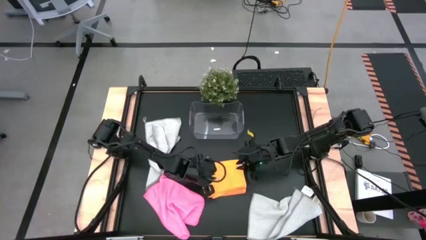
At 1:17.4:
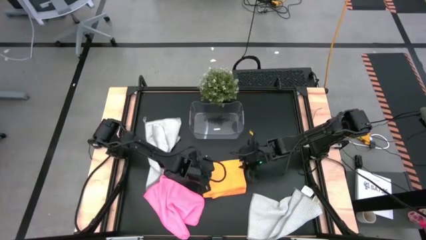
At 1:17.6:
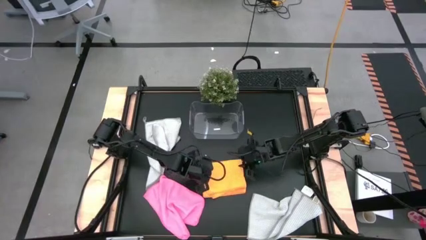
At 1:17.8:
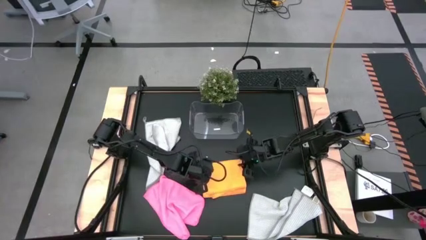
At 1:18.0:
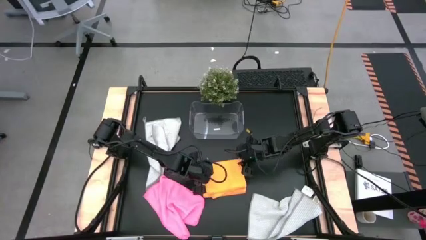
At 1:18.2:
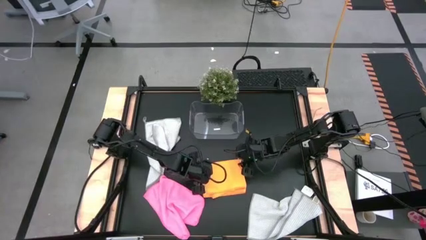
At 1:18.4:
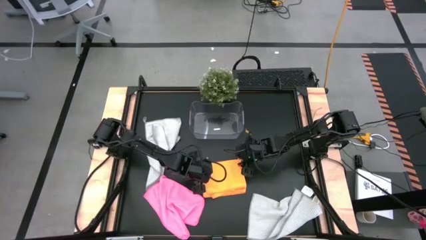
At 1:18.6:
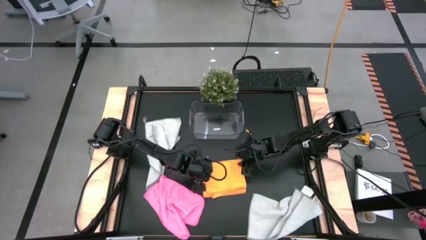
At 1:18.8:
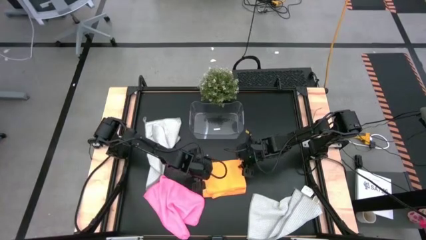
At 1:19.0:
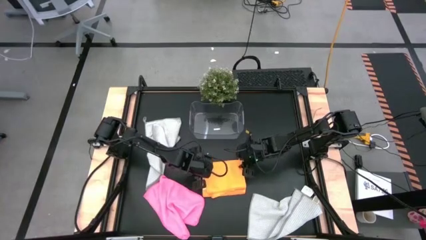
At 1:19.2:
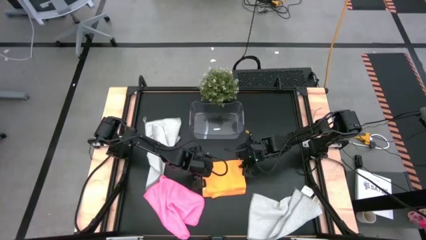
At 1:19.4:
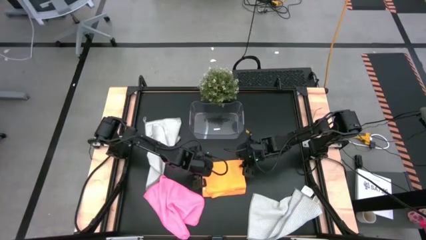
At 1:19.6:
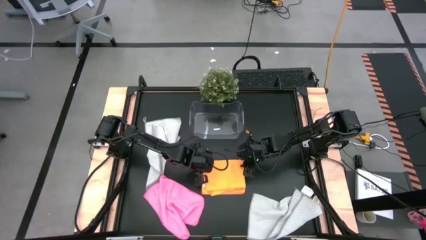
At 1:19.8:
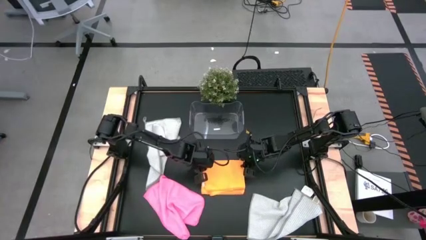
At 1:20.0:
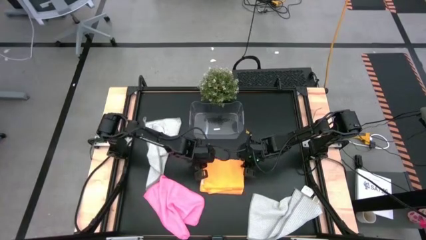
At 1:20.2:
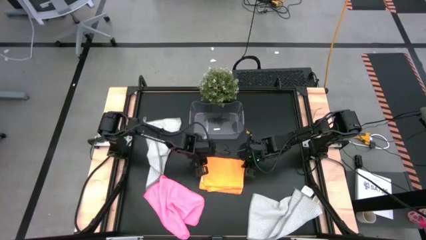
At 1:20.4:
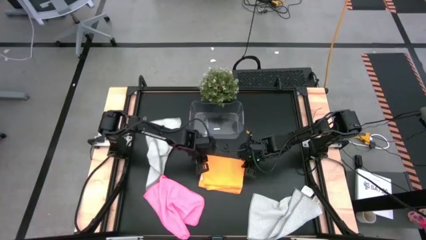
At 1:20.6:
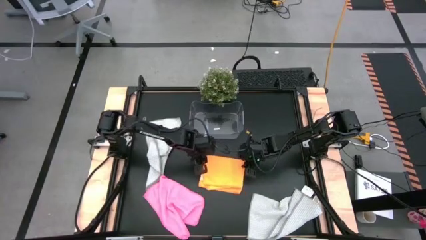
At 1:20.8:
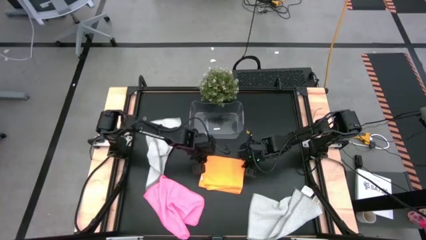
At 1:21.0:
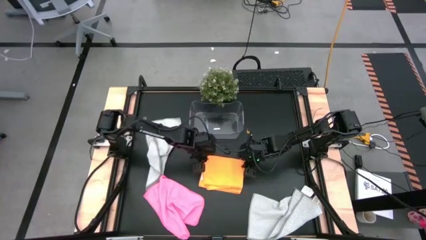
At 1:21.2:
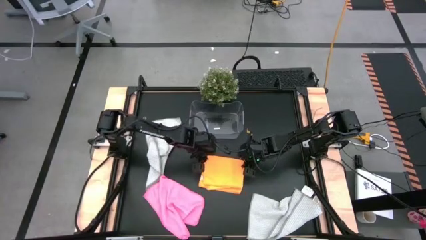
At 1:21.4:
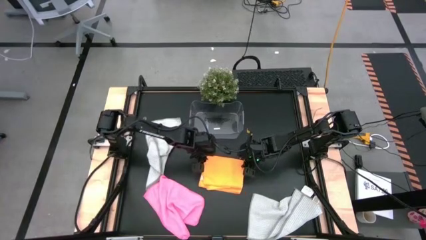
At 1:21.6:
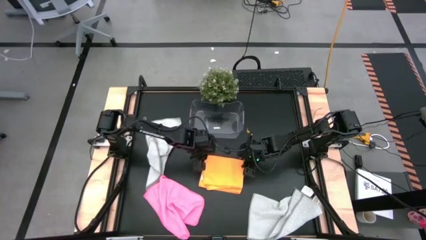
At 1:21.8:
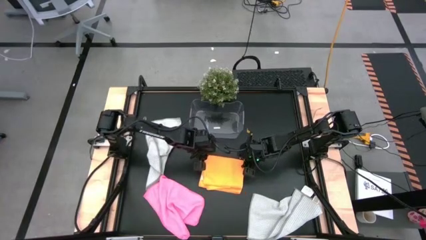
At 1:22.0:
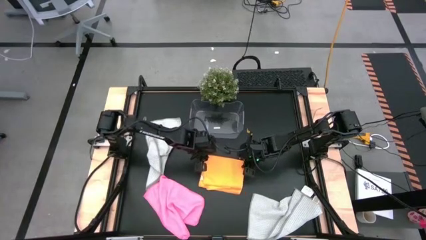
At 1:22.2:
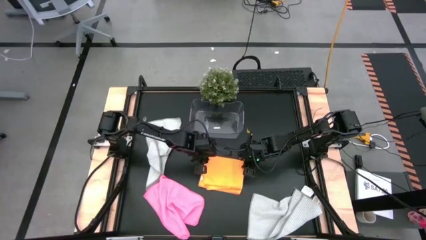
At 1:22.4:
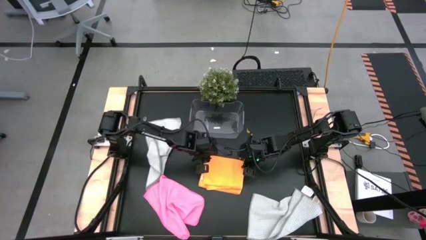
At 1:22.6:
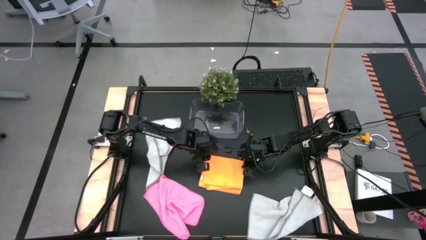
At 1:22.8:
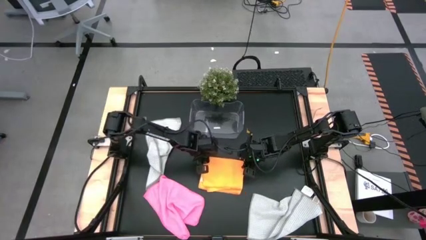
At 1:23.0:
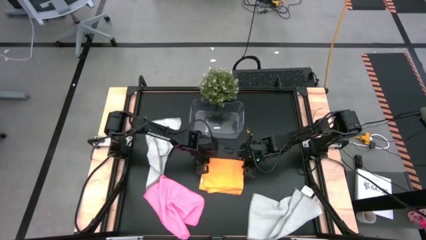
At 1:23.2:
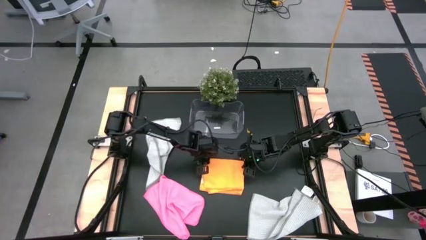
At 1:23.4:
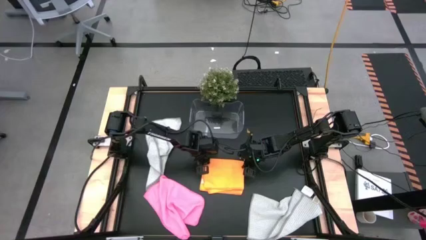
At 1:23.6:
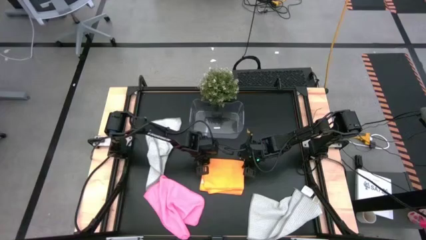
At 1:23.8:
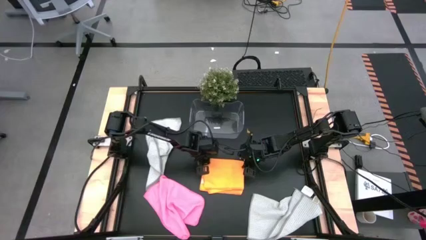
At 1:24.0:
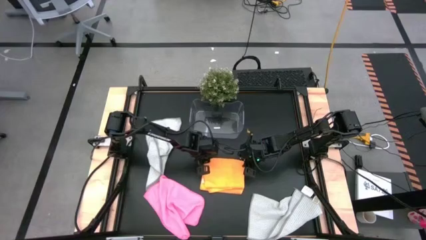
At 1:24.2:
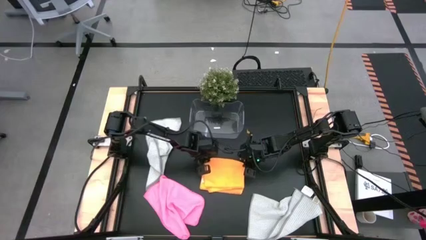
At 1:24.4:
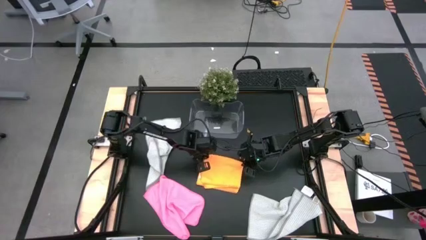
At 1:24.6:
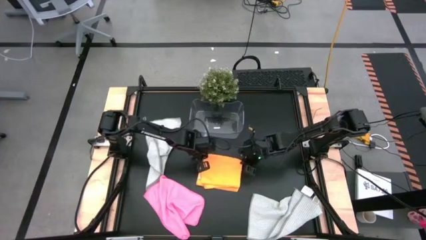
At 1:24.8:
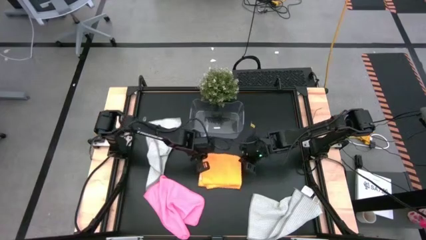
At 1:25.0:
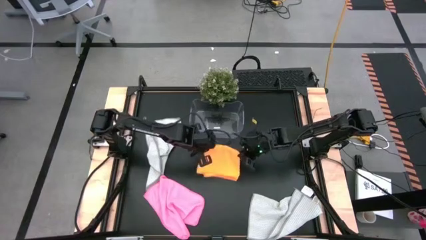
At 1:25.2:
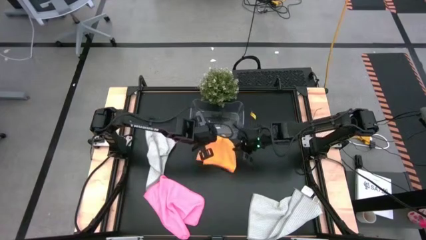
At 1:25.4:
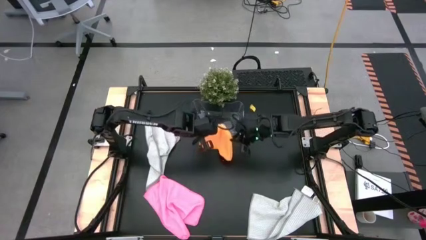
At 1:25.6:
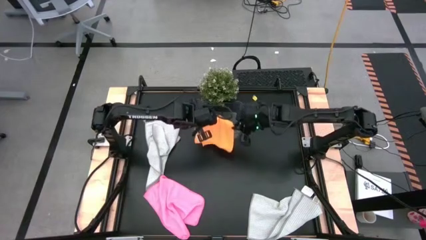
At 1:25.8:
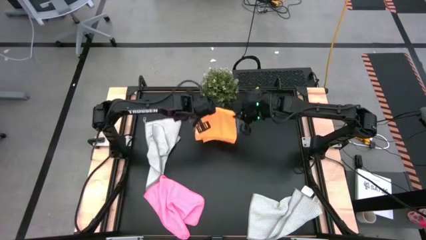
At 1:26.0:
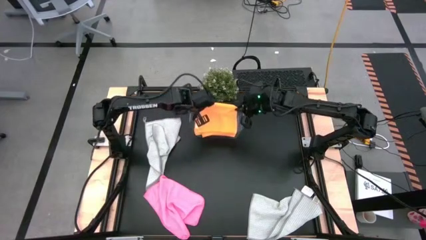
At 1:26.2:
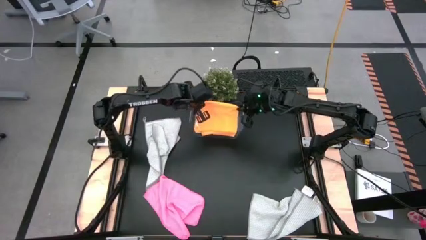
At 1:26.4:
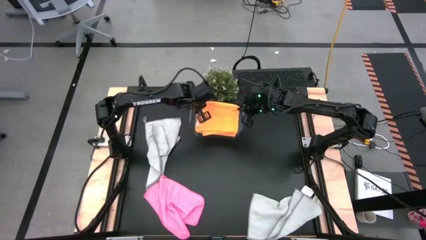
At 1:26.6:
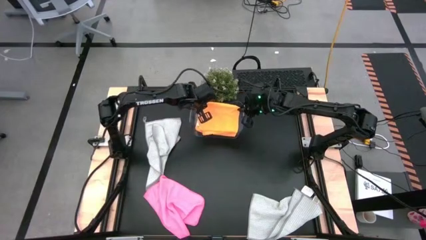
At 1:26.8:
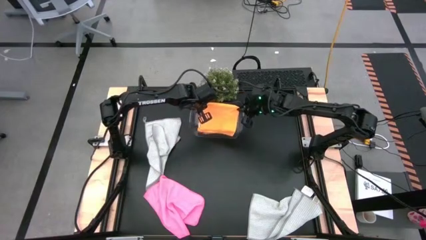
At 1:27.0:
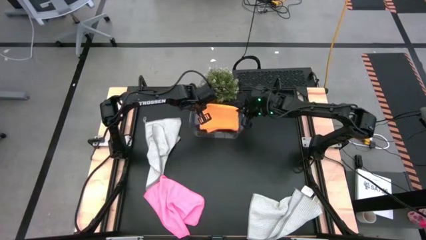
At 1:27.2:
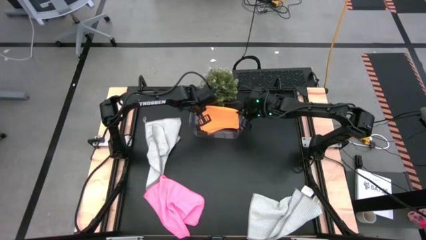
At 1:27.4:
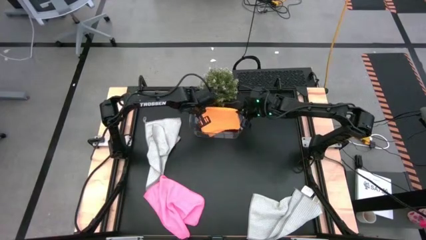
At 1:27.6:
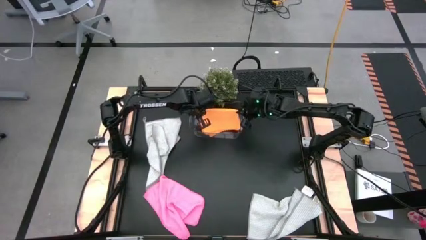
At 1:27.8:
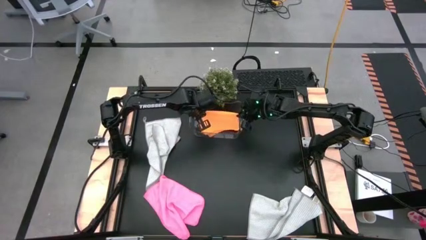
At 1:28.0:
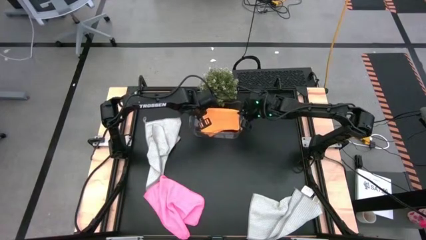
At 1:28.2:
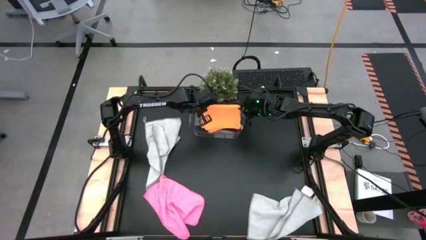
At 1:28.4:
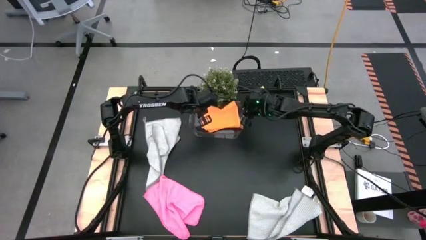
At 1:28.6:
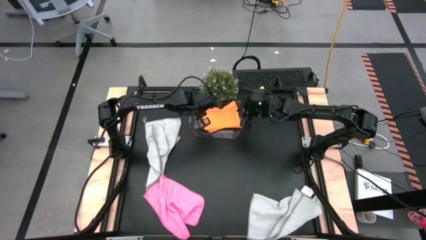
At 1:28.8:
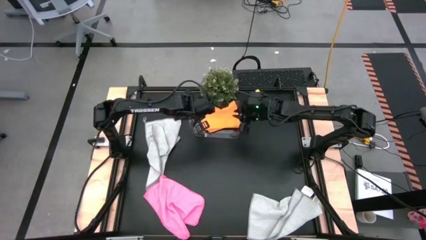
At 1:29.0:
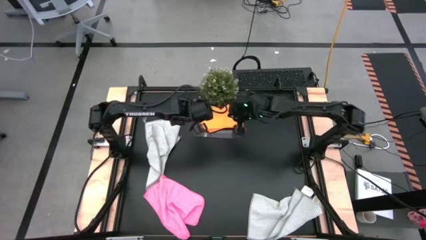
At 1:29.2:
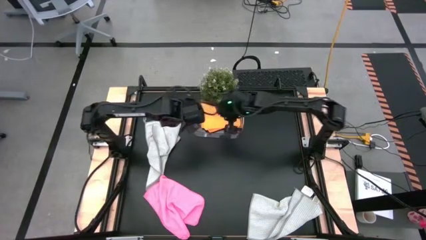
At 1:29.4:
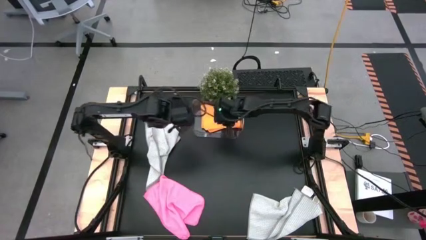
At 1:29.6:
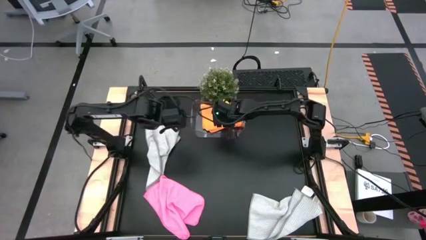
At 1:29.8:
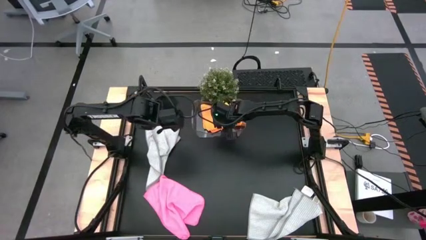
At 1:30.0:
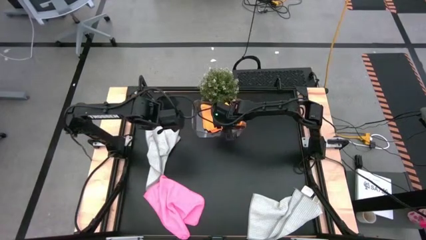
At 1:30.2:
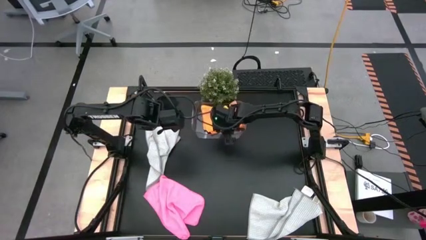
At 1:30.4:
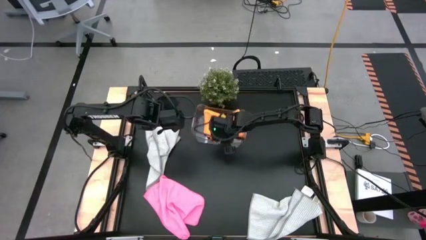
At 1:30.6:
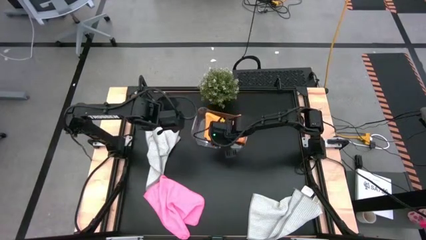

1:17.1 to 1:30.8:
Task: Fold microfiber towels
Put the orange microfiber towel into the transparent bin

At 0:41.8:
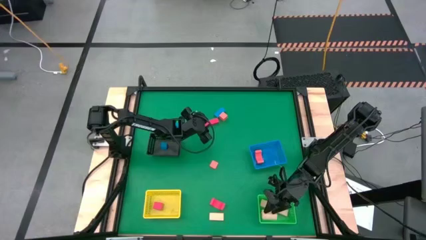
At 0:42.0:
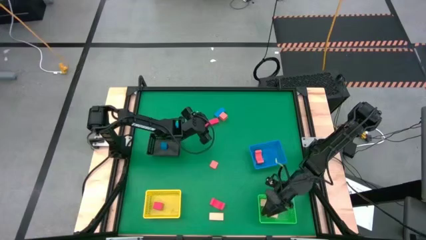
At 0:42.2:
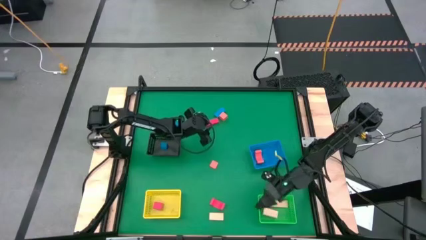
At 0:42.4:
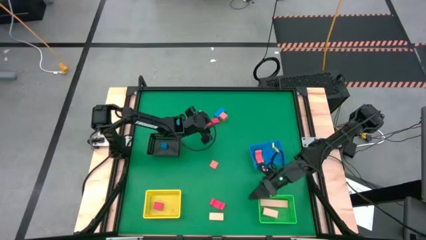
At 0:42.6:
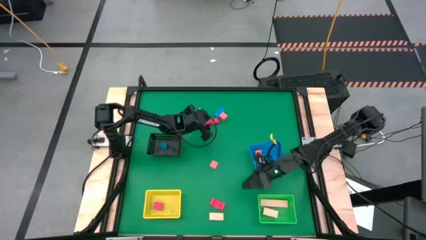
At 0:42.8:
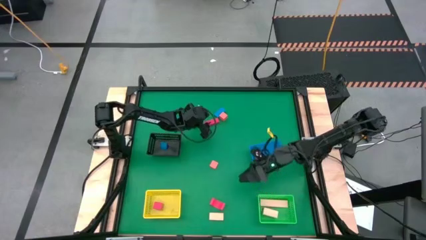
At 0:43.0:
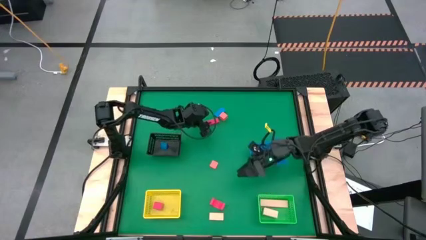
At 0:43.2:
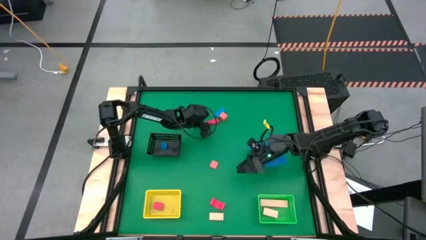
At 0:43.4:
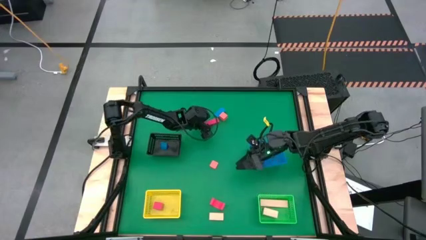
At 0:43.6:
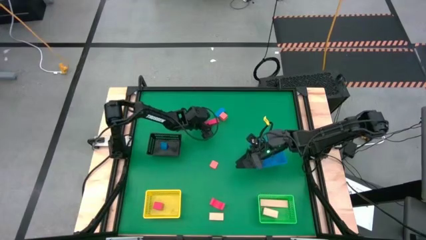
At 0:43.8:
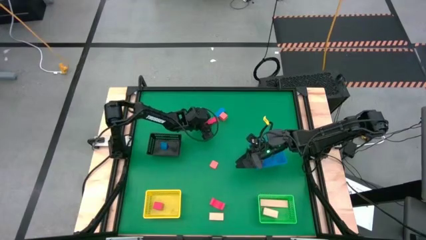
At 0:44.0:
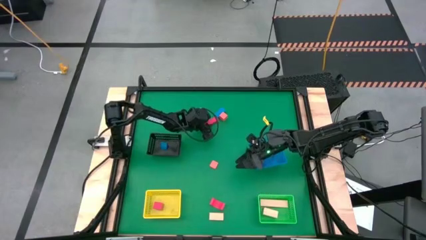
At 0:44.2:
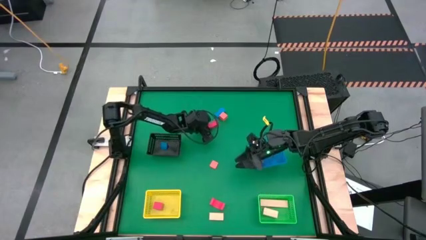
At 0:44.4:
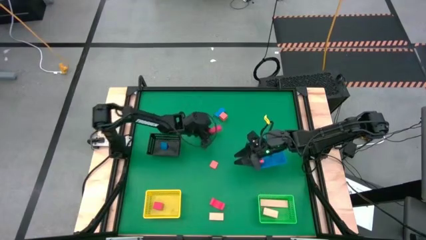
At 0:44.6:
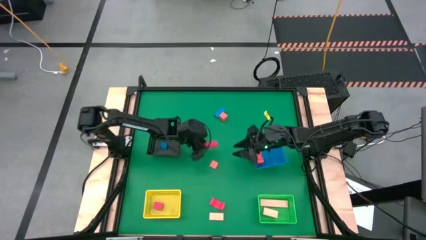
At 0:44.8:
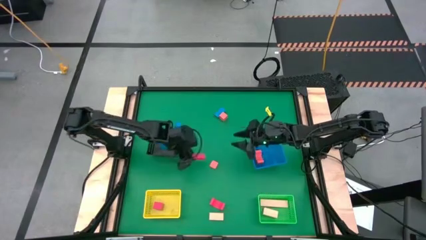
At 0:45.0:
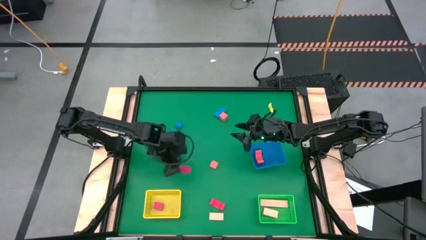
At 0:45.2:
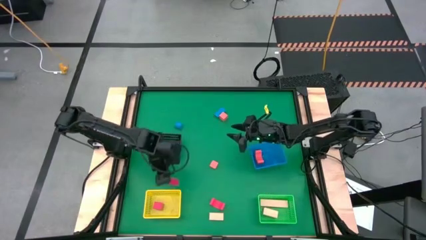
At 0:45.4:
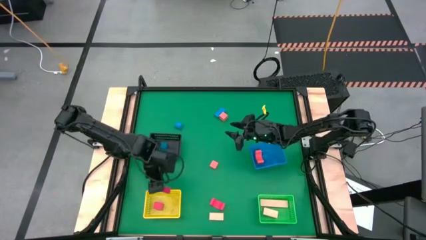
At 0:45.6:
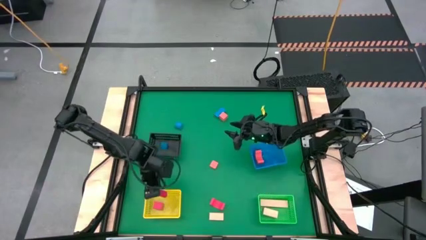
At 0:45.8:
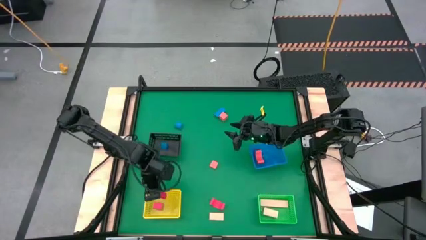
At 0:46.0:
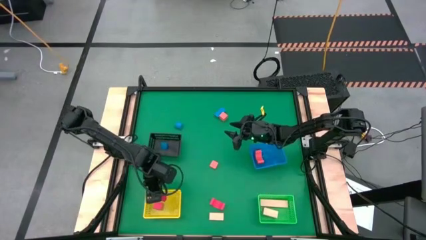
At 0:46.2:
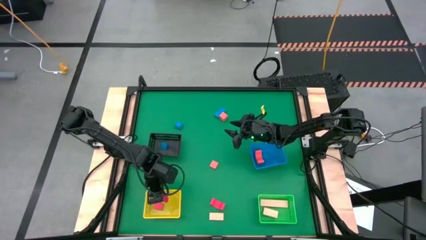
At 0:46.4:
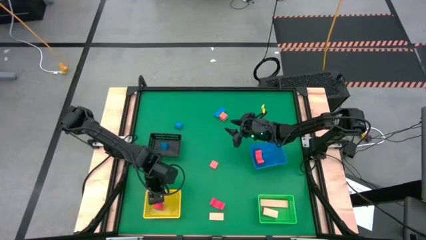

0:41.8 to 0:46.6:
Task: Sort & place blocks by color
Put the top red block into the yellow bin
